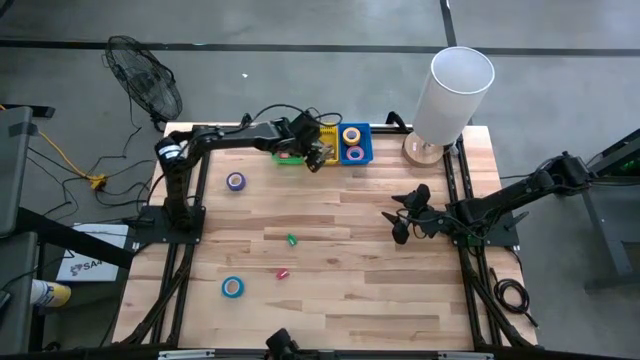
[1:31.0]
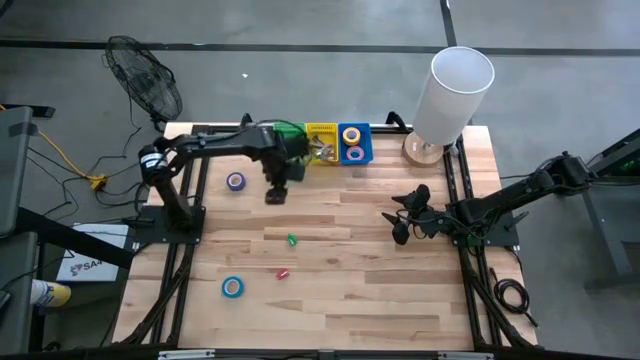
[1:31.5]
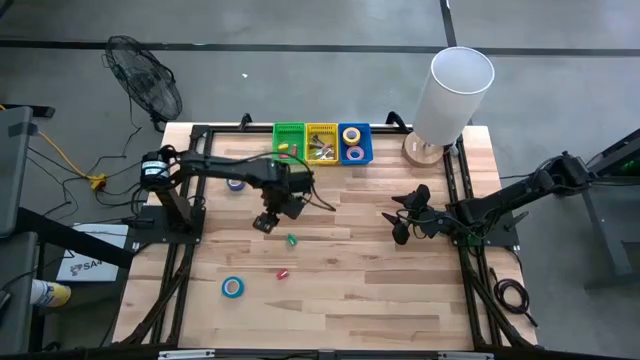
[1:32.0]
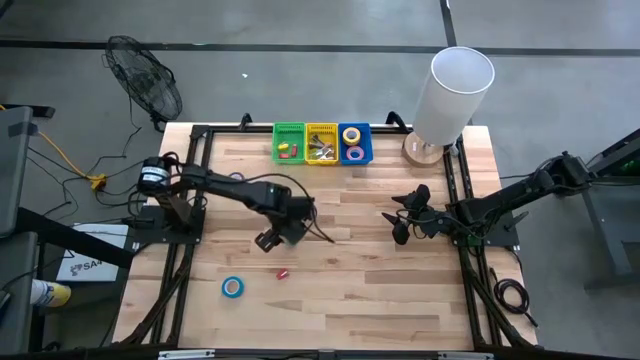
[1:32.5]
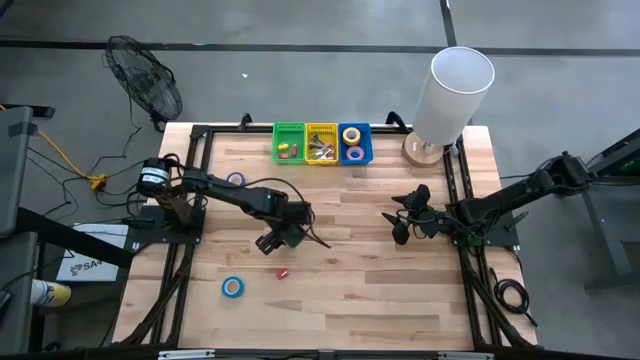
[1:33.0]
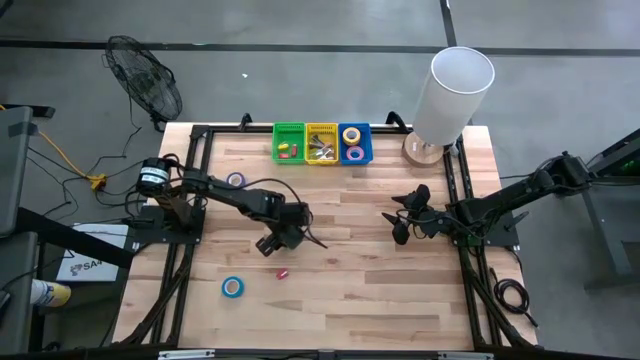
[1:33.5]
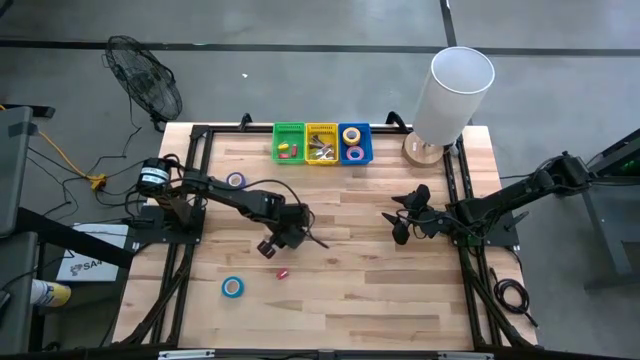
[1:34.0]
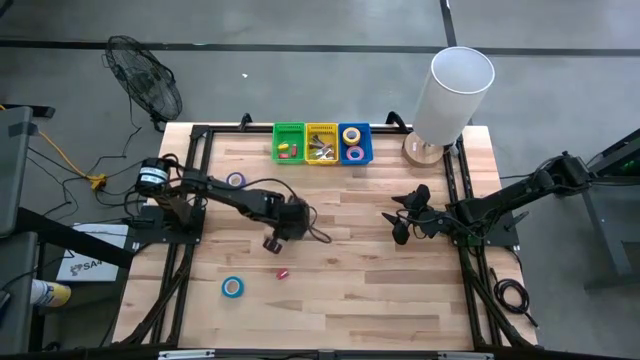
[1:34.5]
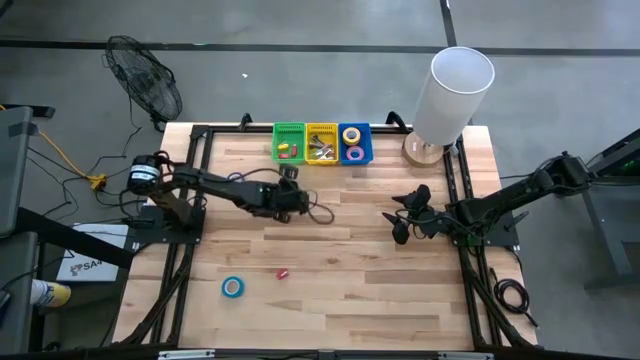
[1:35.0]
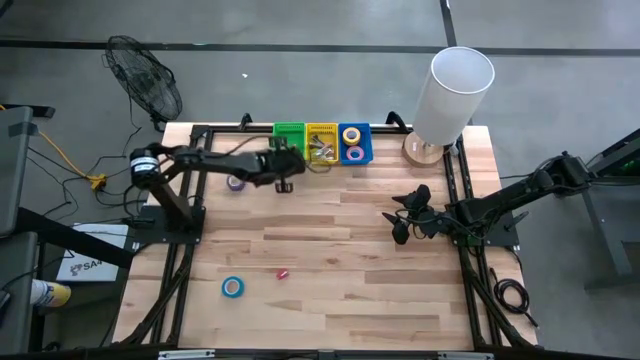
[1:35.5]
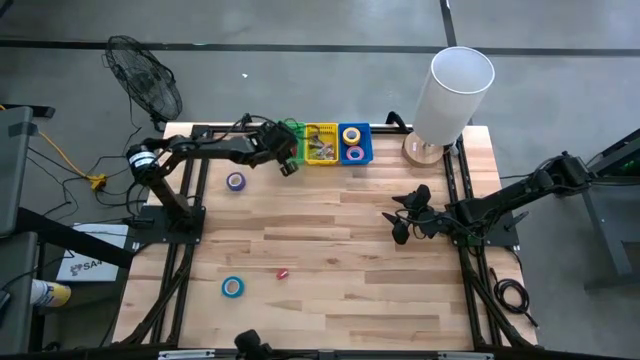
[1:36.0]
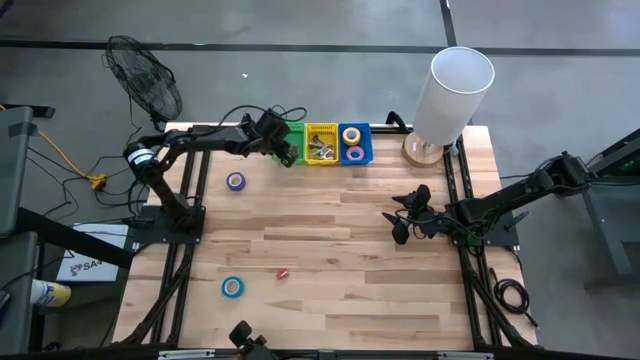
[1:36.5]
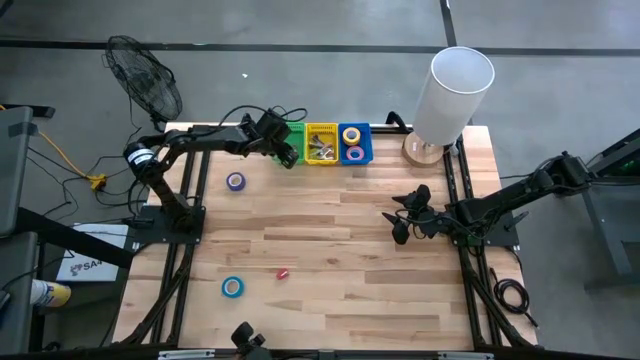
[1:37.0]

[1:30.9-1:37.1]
Task: Pick and place Stapler, Stapler remover, tape
Put the green stapler into the green bin

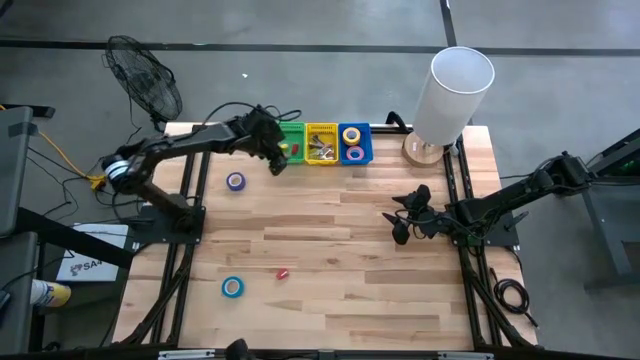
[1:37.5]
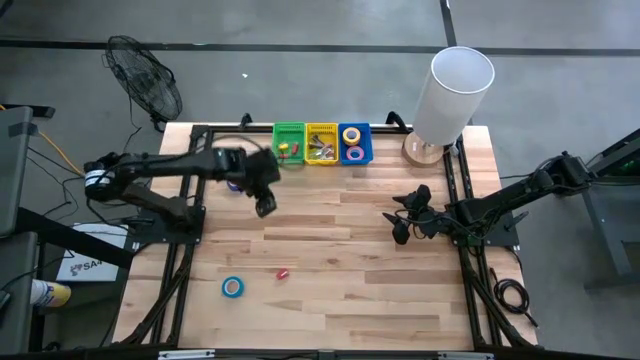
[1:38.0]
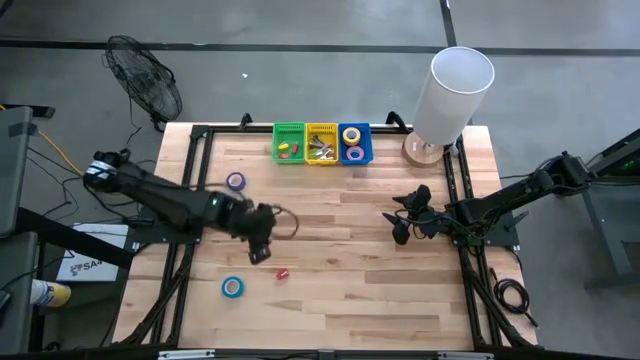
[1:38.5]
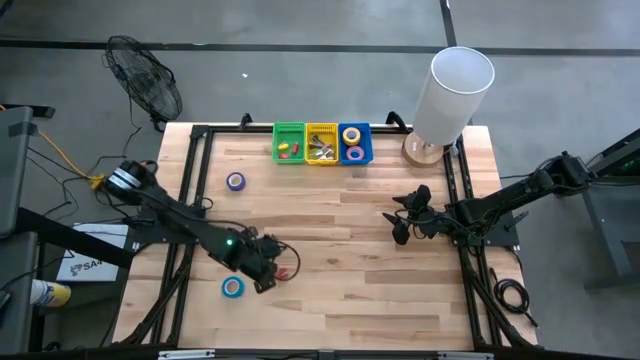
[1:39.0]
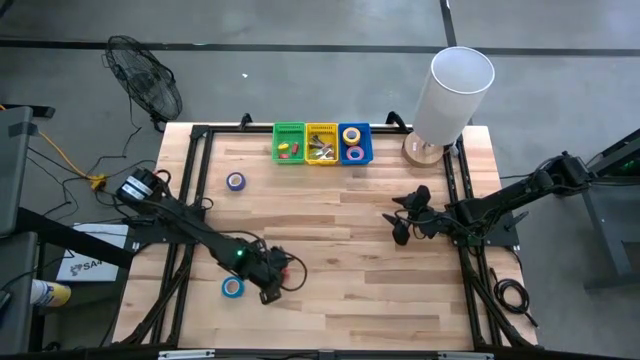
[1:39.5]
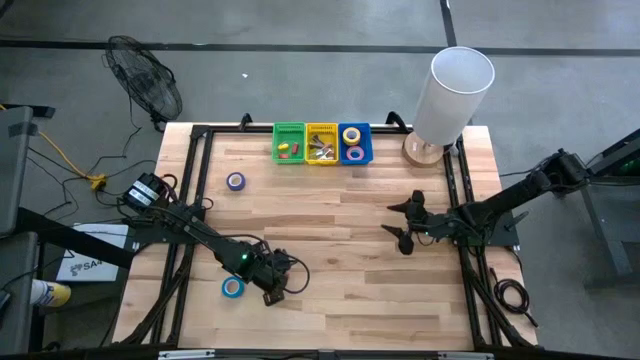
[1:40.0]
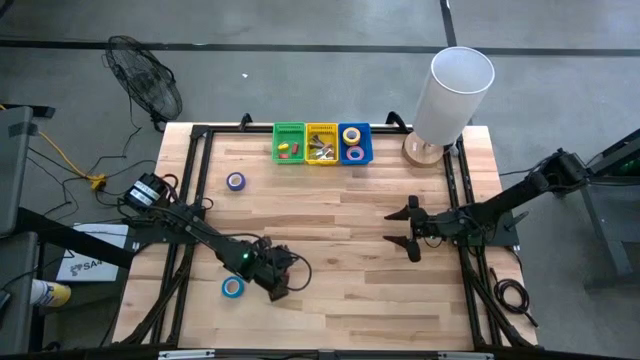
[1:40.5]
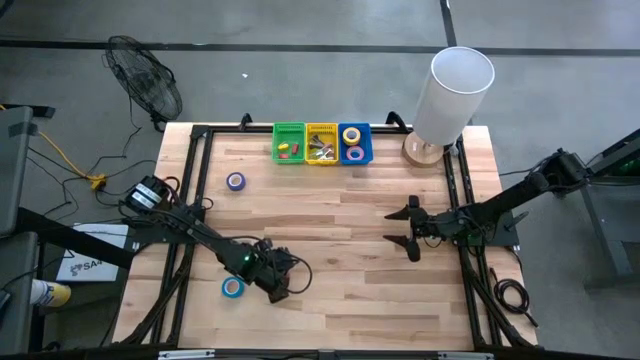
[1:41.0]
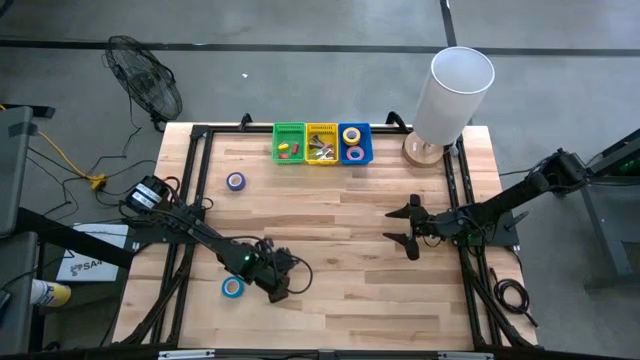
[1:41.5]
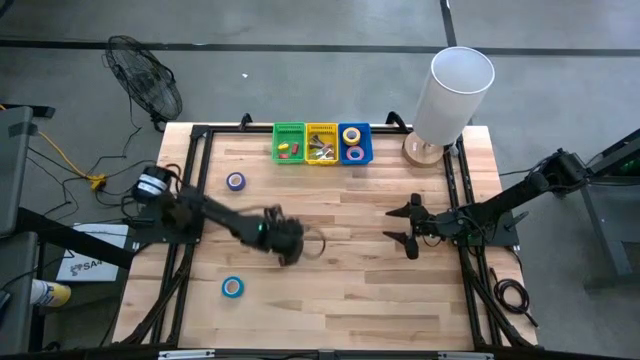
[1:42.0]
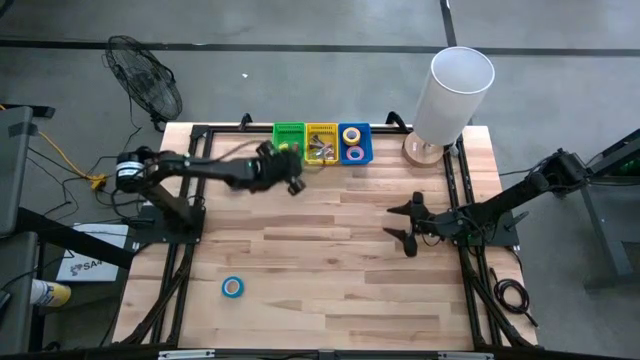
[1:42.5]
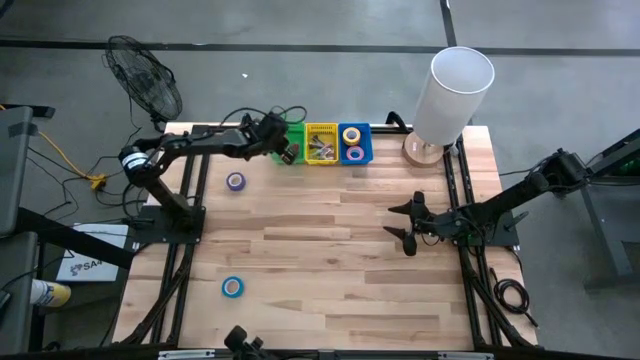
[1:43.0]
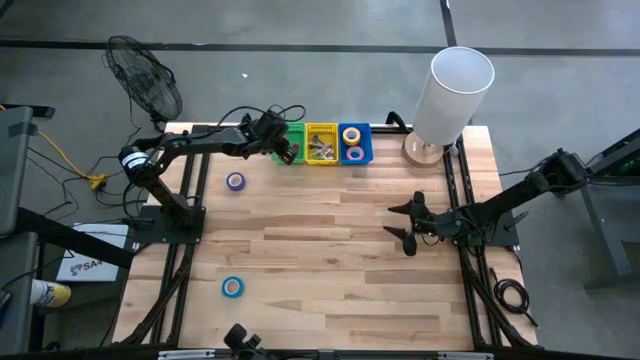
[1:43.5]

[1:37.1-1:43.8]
Put the red stapler into the green bin

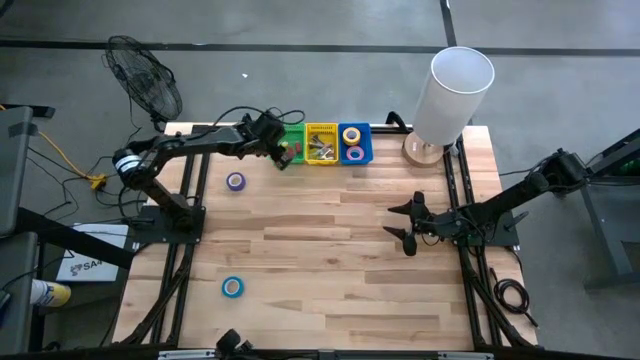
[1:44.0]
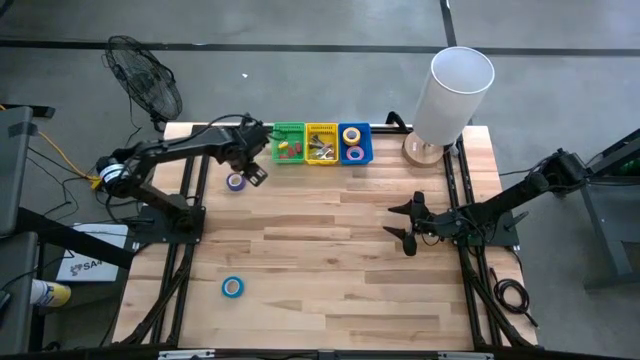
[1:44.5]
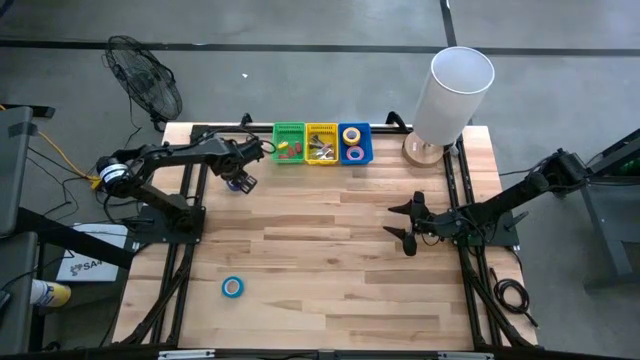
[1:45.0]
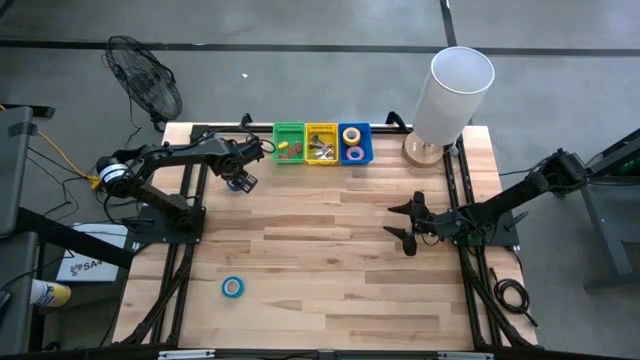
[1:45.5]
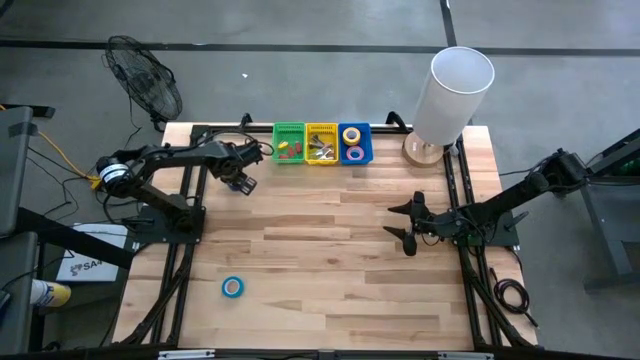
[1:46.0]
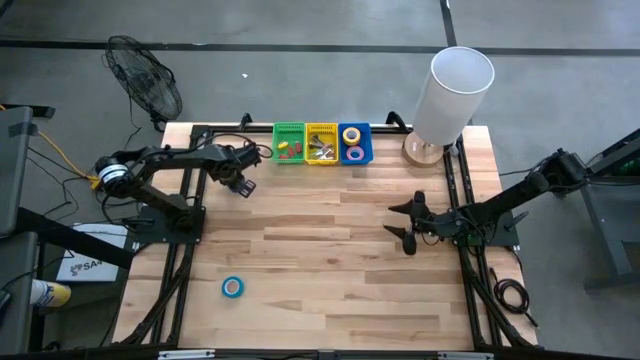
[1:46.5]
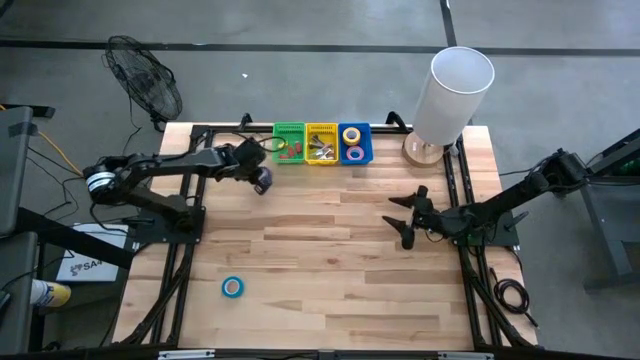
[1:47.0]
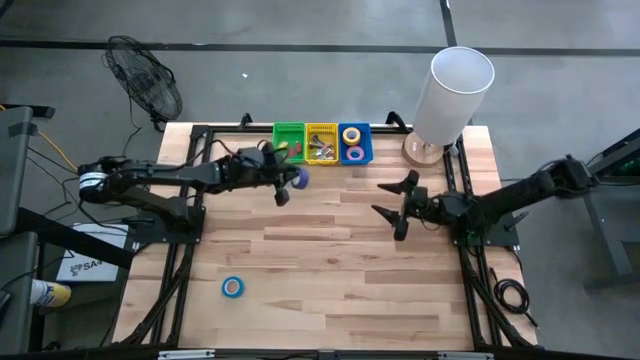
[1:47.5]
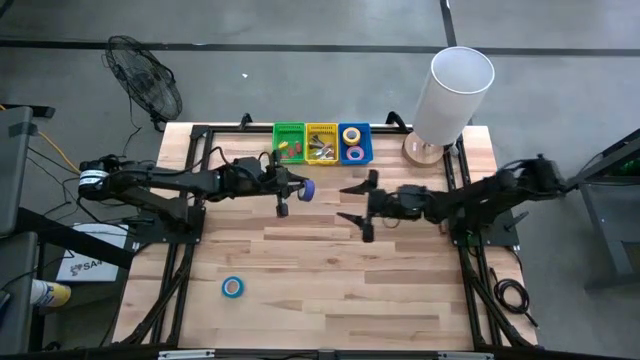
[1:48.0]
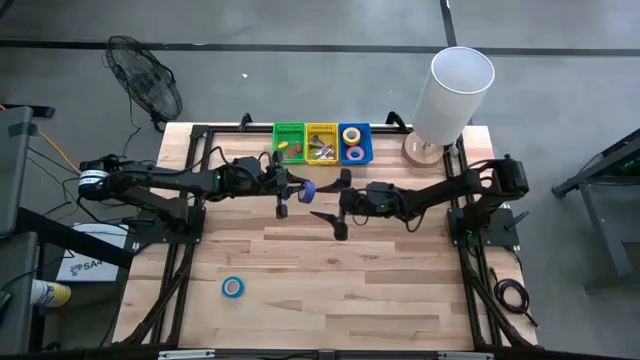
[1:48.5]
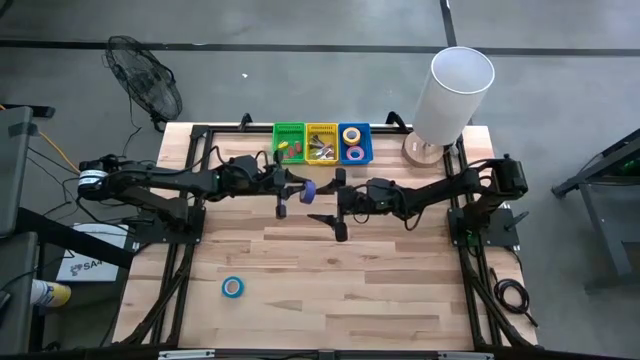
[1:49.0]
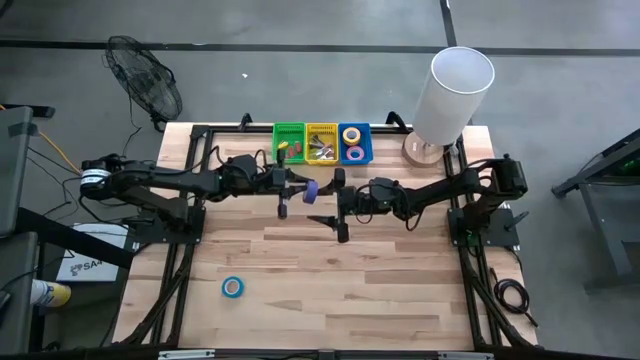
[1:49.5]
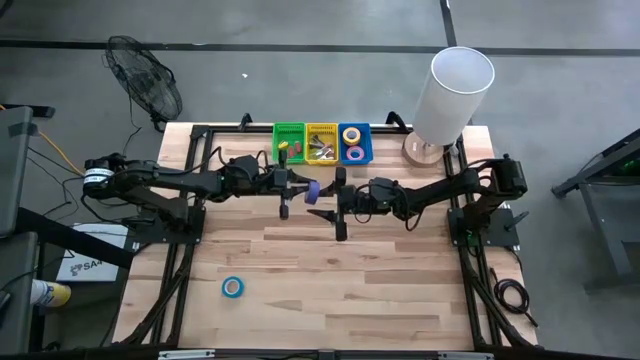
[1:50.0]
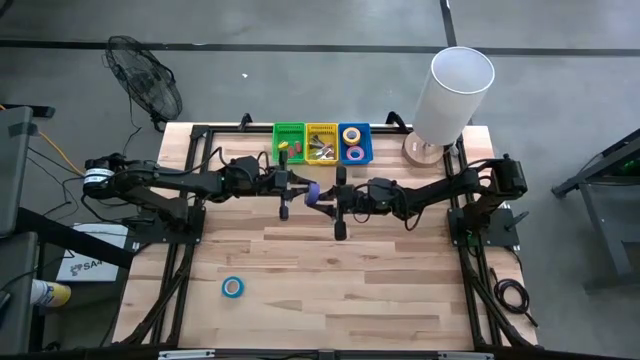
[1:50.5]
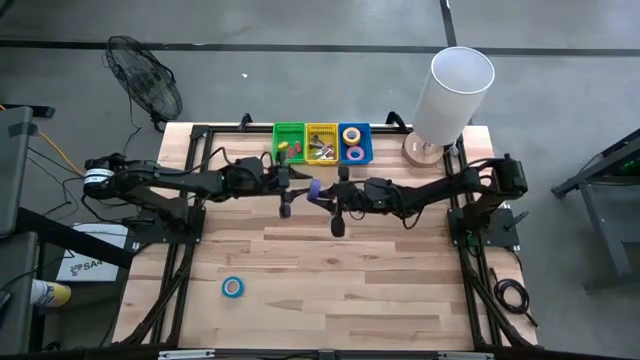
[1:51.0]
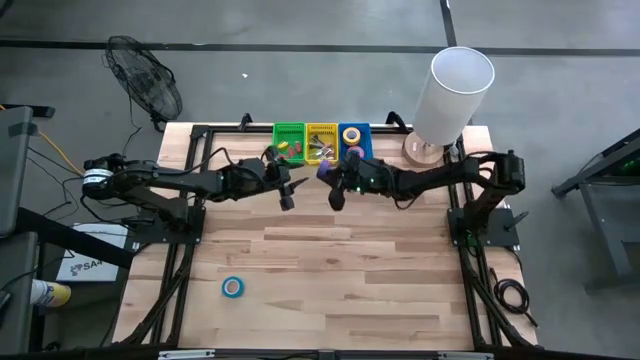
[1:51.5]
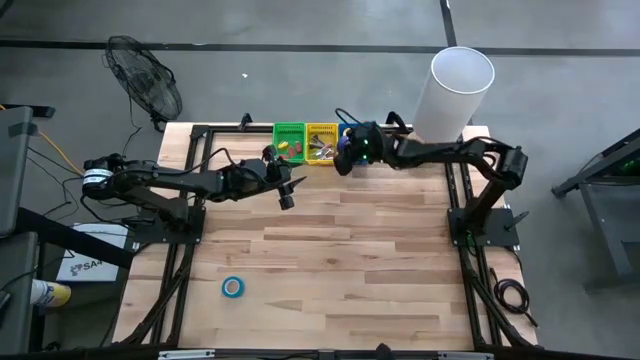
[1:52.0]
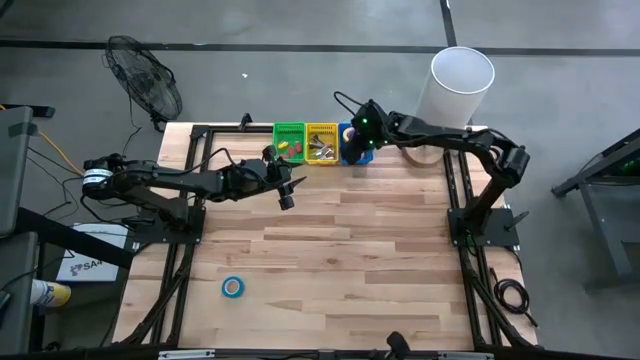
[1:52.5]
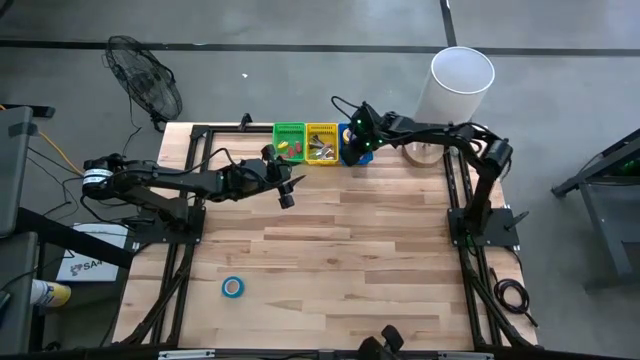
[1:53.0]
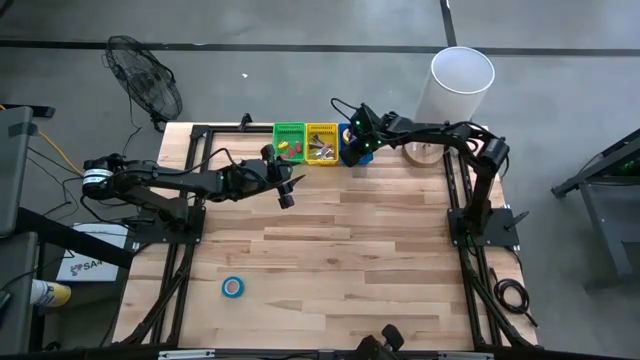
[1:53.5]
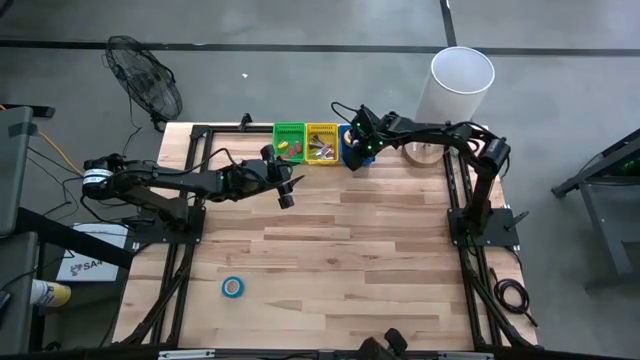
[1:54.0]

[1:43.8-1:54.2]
Put the violet tape into the blue bin
